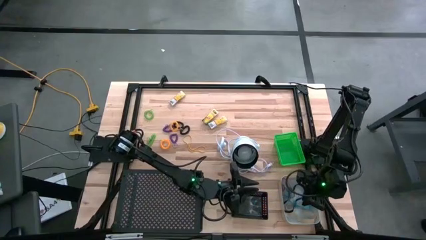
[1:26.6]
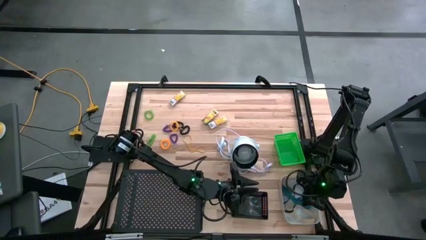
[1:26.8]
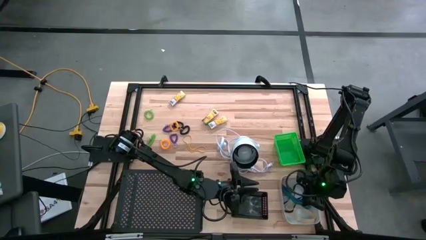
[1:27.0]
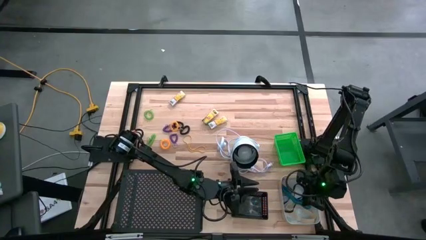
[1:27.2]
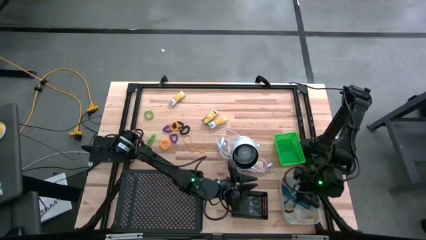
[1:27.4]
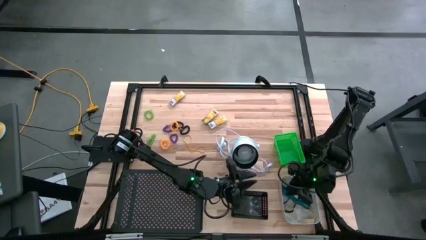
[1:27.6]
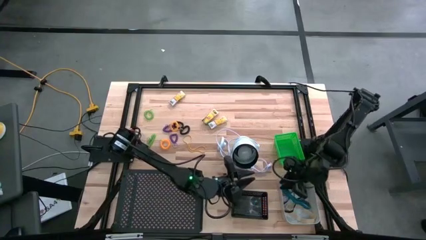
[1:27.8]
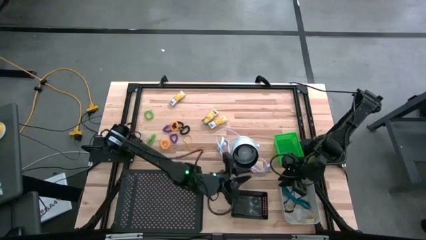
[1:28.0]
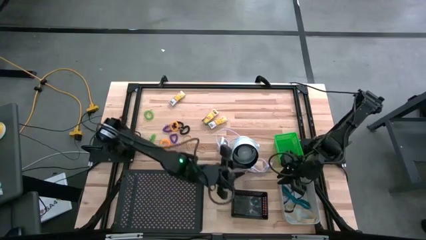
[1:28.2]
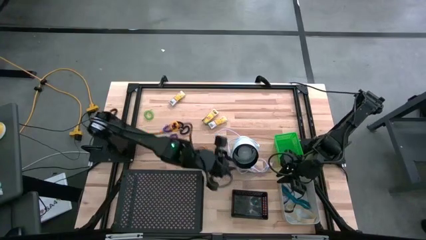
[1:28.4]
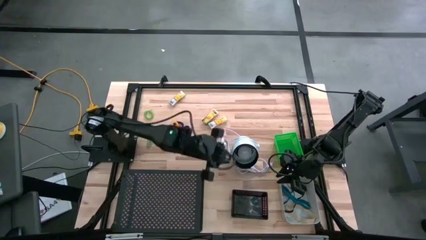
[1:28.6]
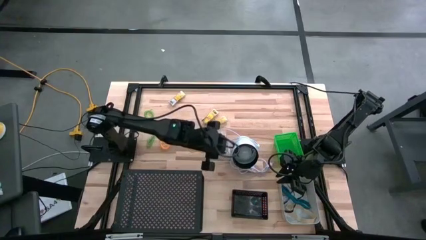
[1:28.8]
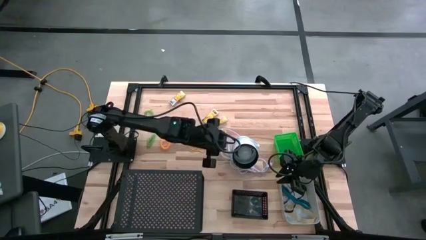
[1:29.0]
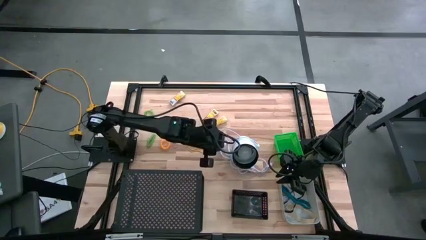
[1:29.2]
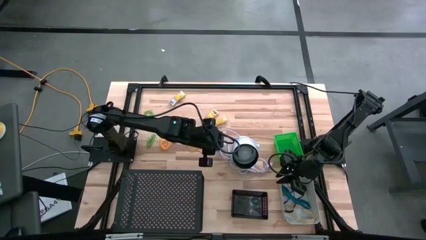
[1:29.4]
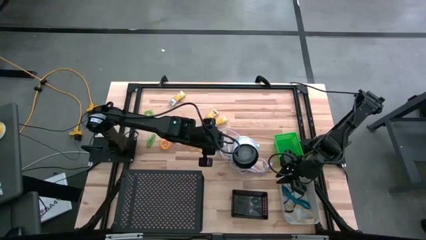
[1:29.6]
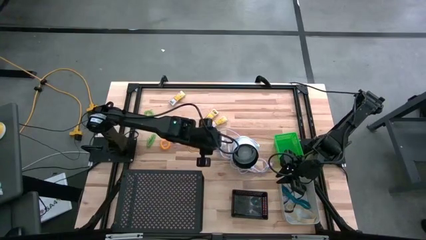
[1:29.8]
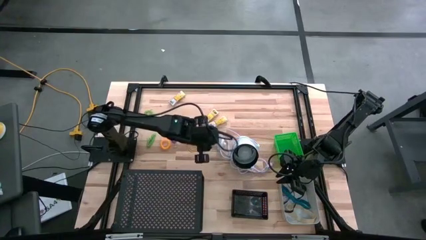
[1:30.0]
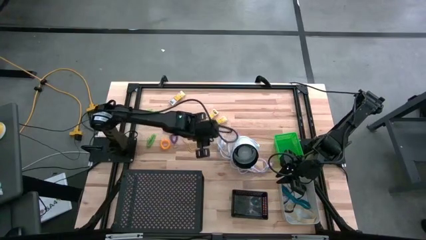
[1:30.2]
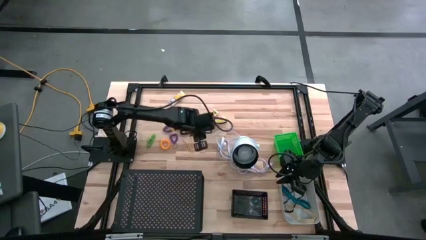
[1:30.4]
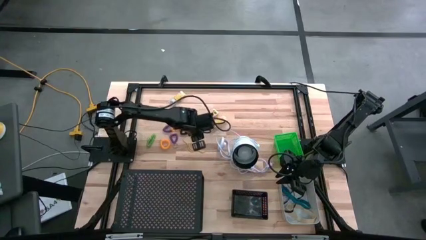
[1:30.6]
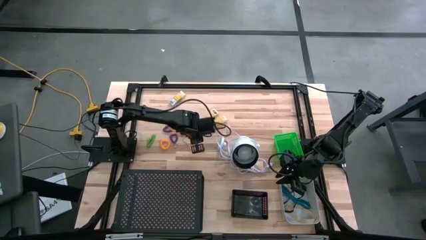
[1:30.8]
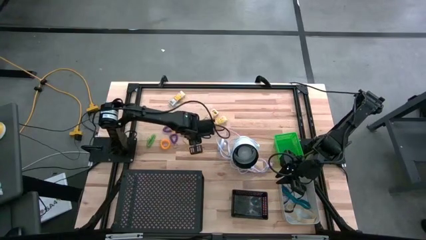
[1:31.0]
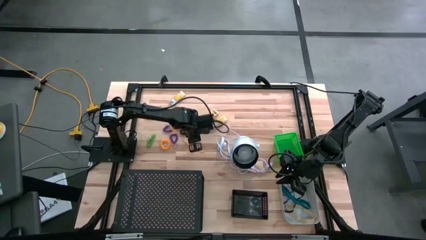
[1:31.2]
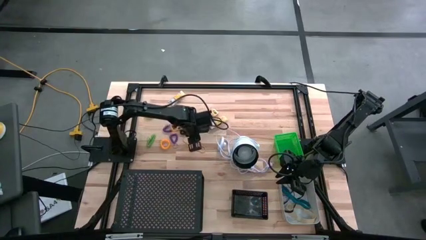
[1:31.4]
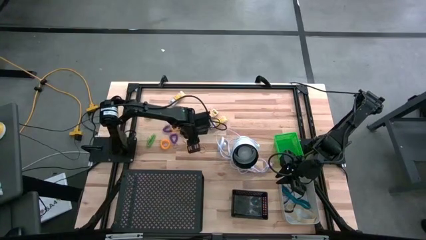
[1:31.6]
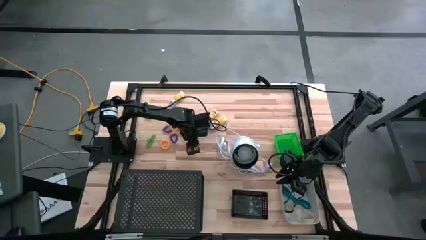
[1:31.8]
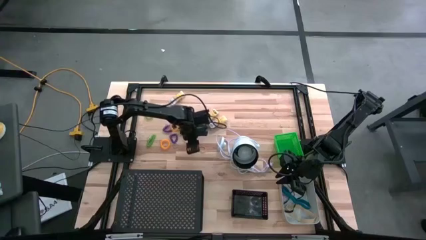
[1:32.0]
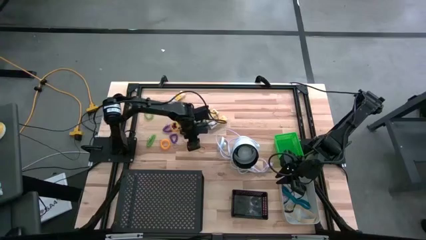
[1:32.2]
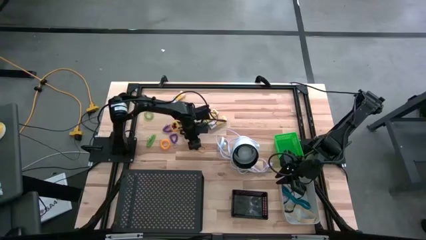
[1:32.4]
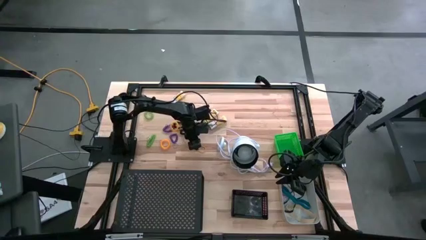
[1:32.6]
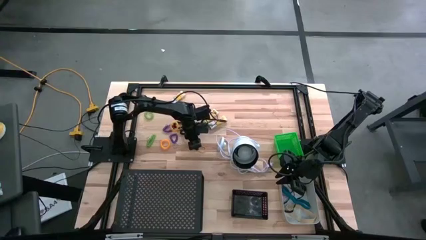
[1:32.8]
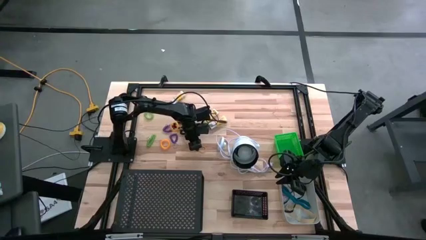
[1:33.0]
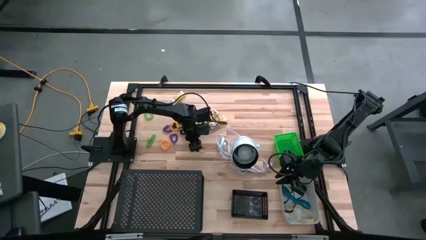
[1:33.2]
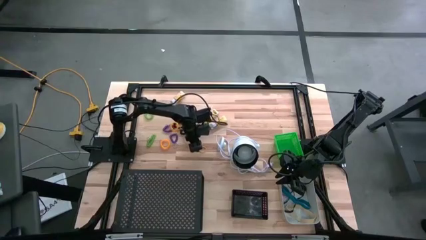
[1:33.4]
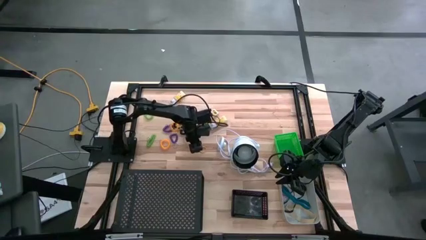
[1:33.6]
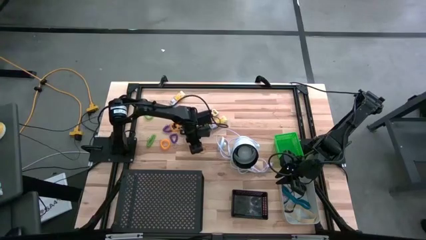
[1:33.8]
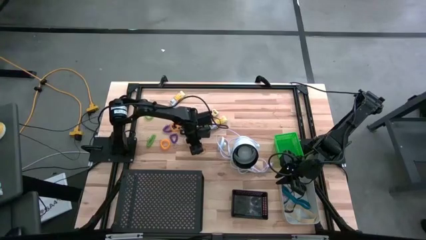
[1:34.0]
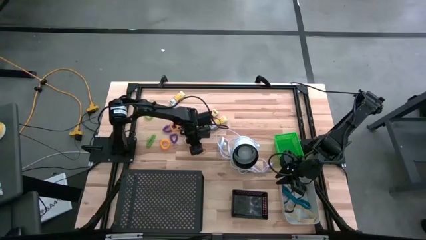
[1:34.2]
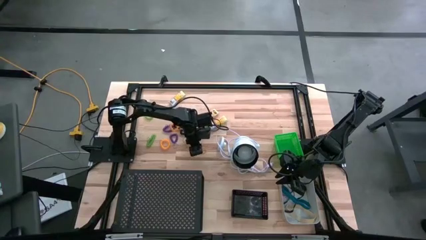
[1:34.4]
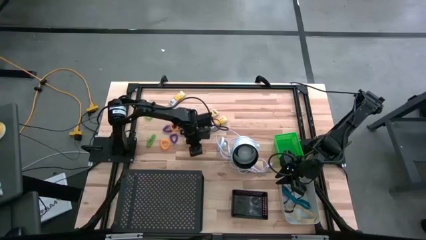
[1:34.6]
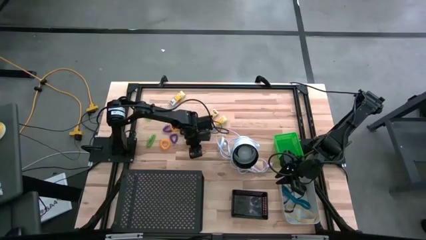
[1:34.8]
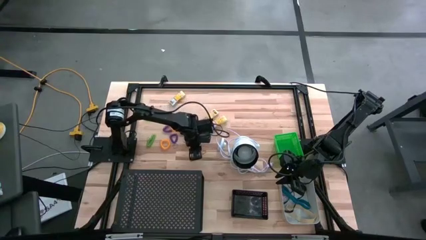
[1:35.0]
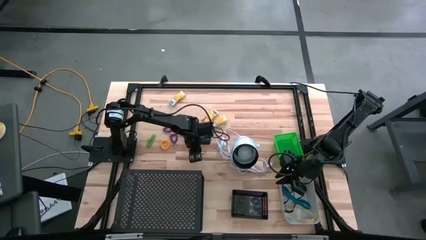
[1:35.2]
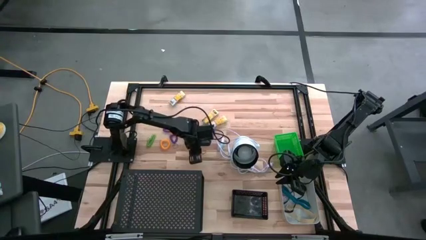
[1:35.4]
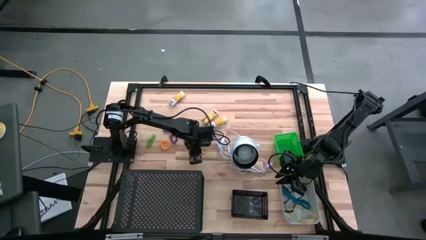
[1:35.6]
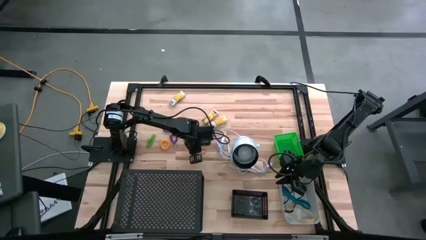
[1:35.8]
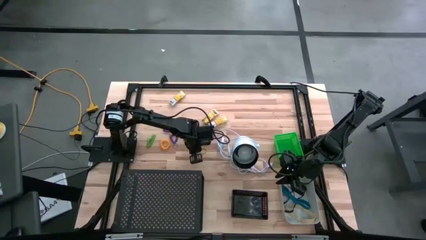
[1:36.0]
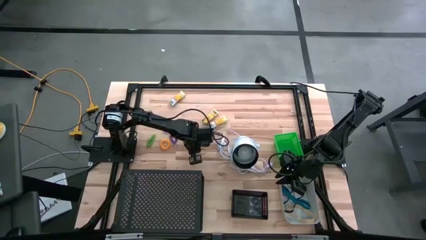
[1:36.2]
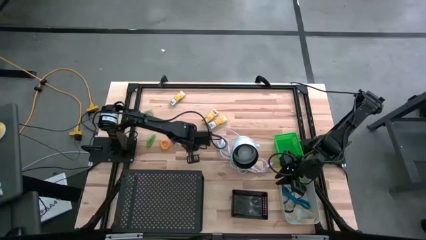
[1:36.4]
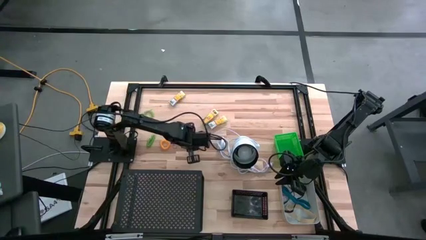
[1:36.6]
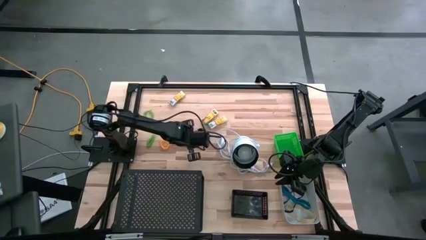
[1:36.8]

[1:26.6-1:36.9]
Task: Pick & Place Office Desk Supplies
Put the yellow rubberband into the gray bin

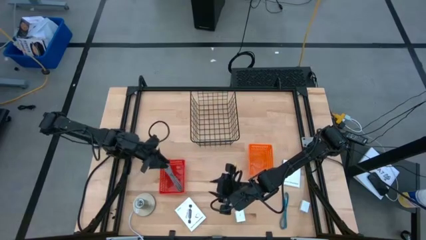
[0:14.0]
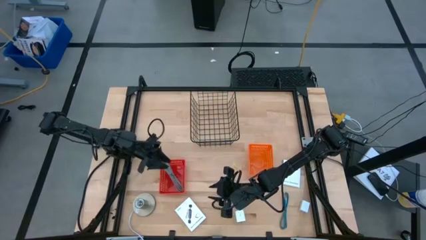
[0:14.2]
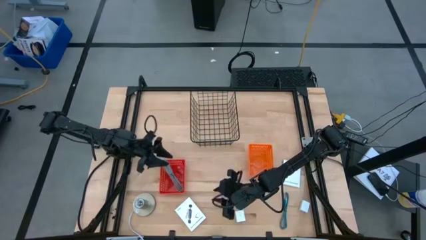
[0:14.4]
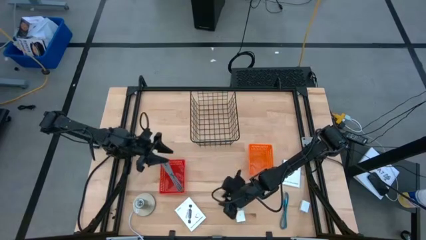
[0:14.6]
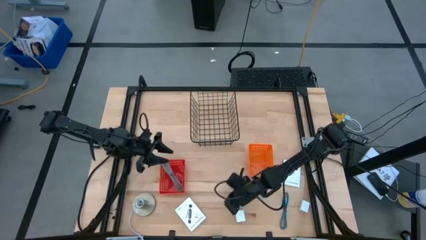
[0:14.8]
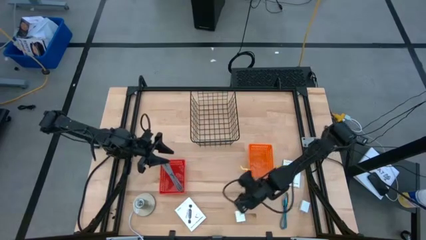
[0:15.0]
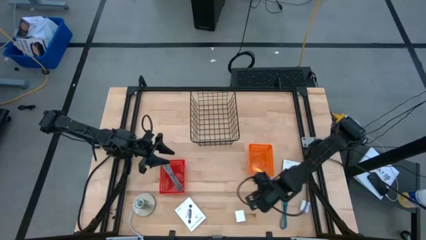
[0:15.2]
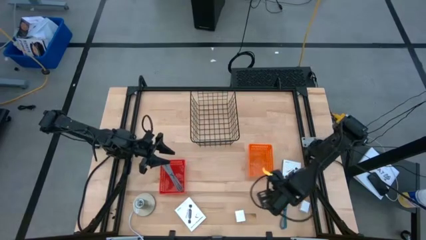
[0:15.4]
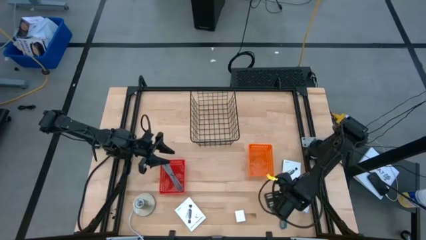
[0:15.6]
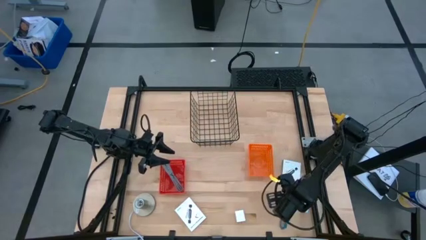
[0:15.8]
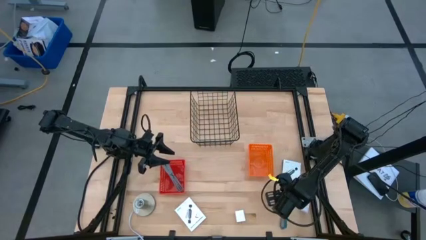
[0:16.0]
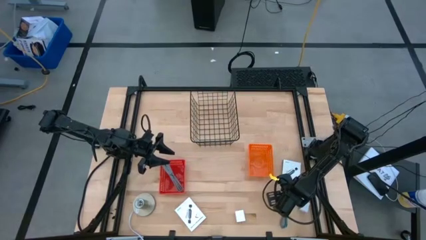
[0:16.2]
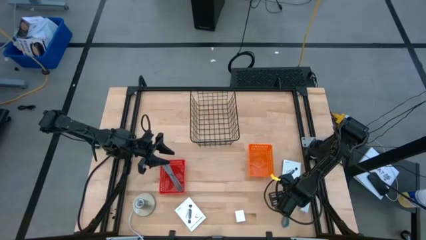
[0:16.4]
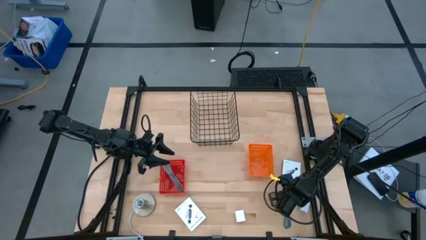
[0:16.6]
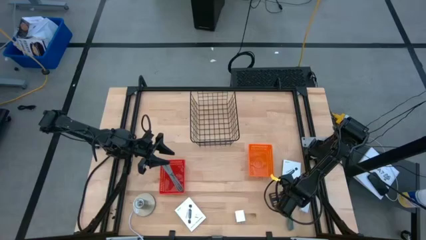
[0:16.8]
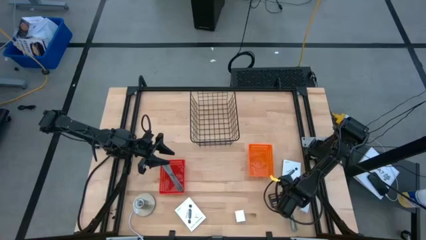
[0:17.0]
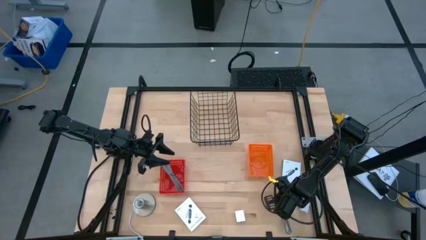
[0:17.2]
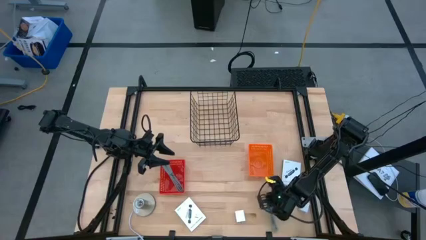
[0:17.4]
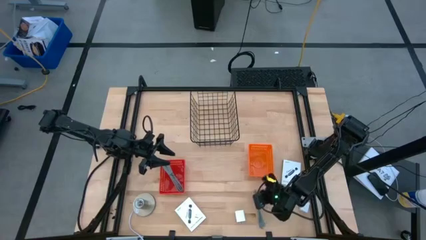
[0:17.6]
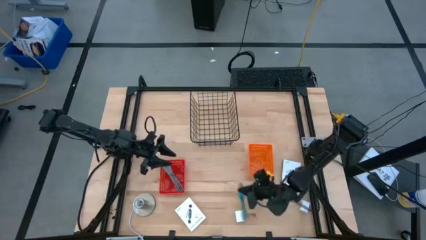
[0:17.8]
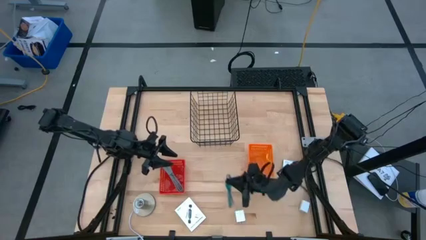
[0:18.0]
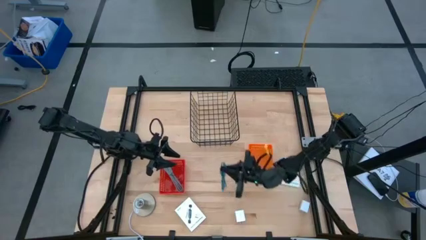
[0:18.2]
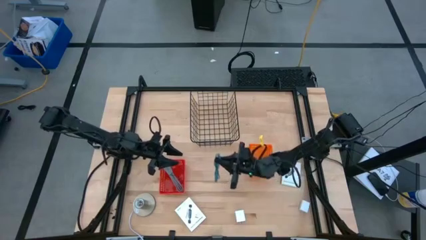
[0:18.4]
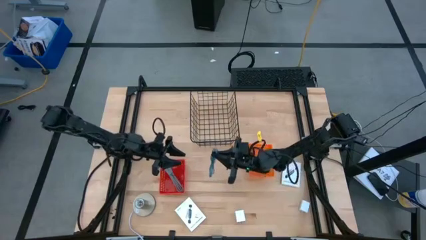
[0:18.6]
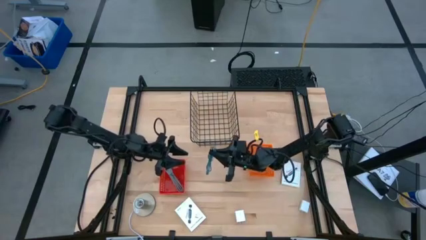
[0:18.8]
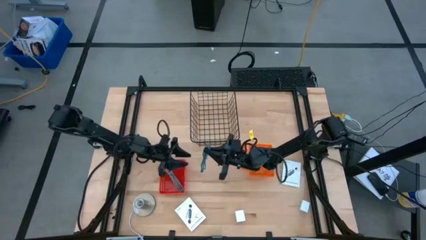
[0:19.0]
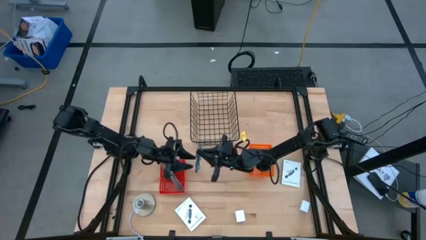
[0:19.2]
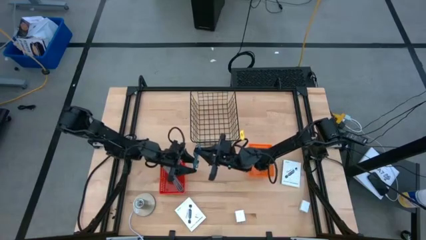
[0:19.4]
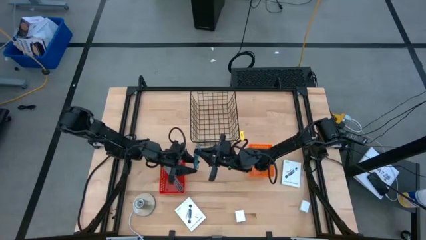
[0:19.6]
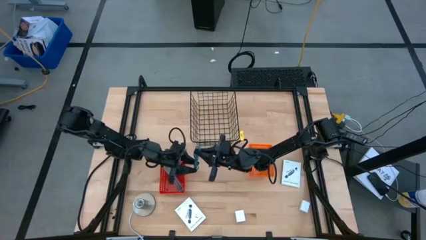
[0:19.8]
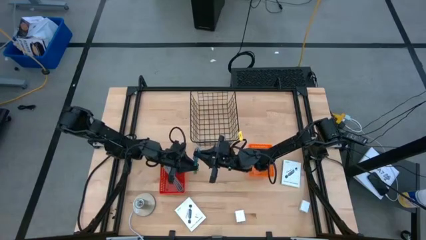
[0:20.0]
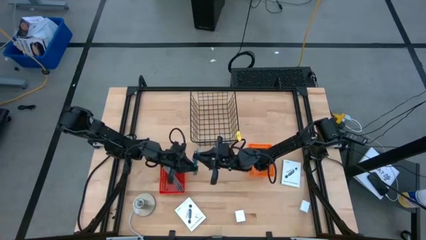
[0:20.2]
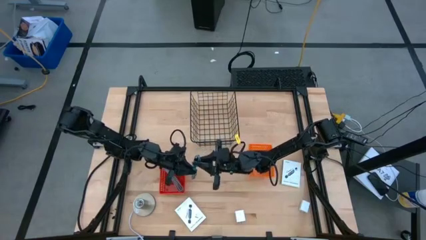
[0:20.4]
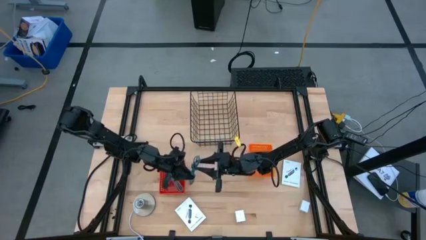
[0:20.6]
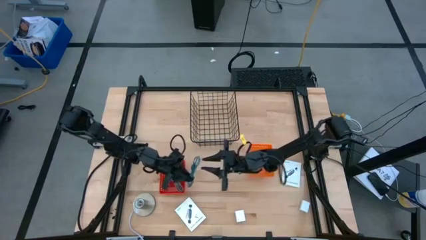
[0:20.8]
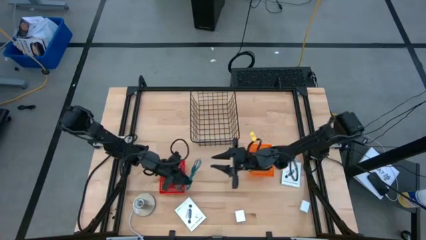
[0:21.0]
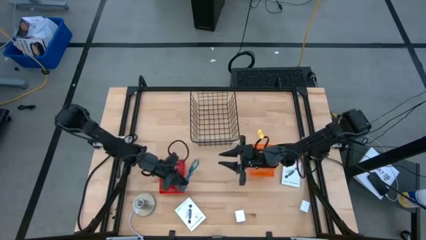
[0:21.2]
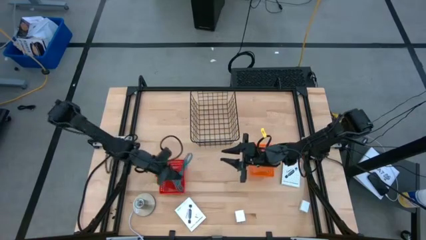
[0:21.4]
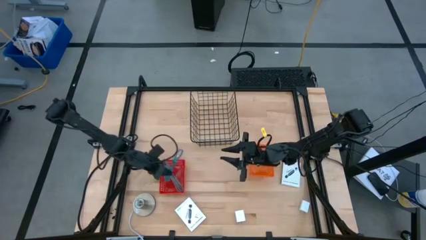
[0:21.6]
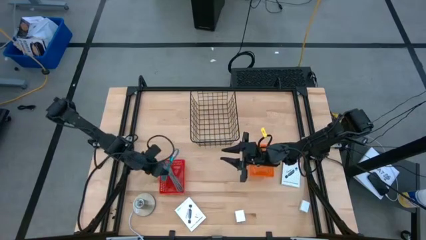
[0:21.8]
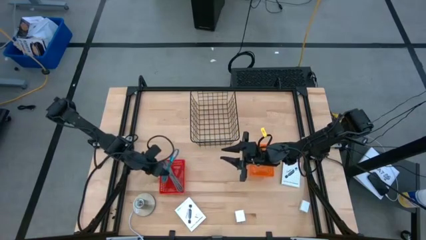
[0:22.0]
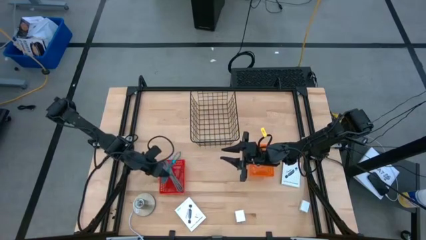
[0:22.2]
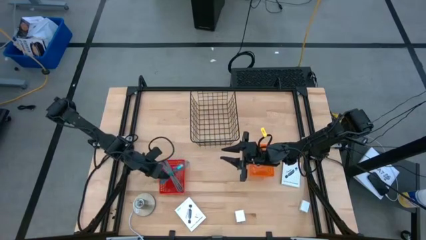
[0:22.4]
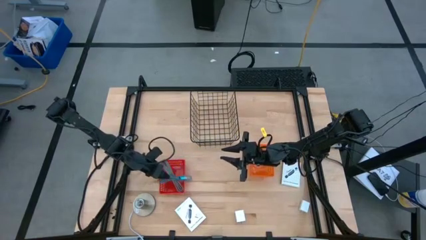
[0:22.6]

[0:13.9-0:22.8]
Task: Pick and place items into bin
Put the blue charger cable into the red bin
